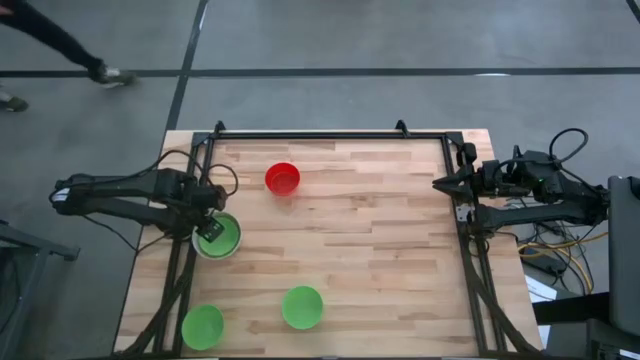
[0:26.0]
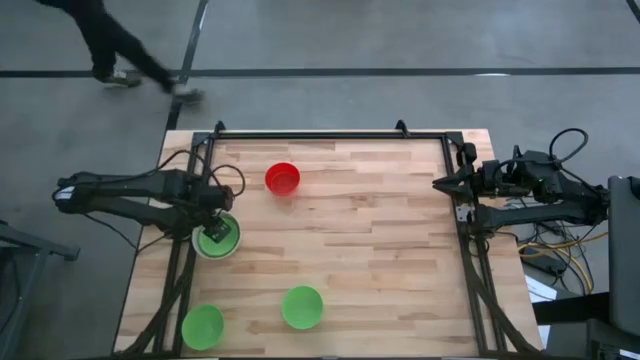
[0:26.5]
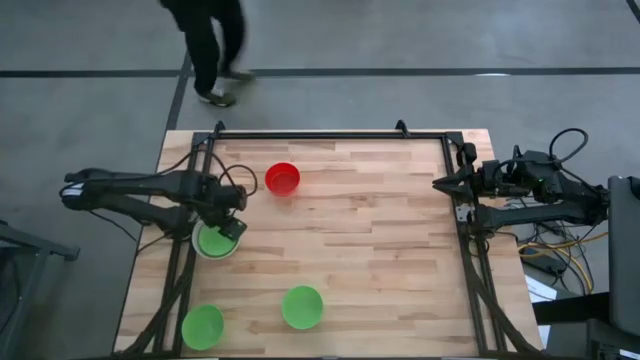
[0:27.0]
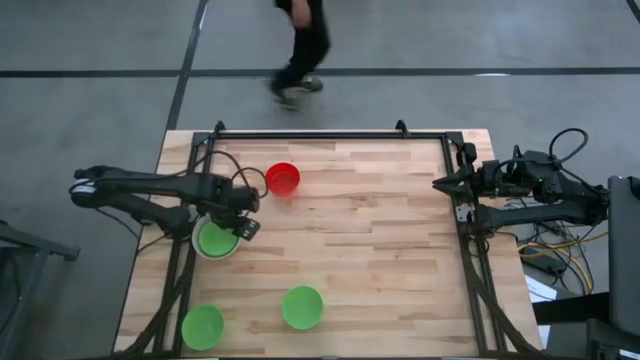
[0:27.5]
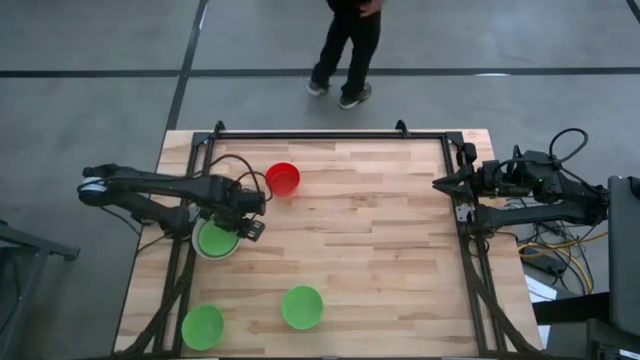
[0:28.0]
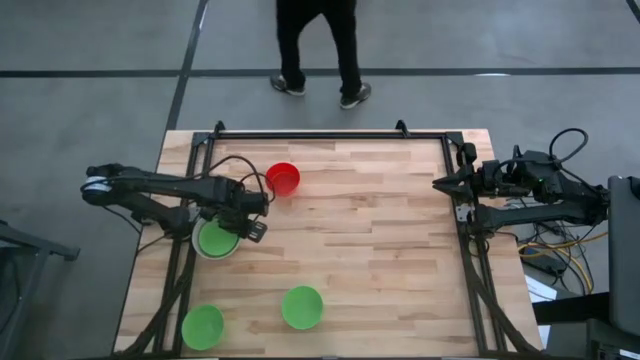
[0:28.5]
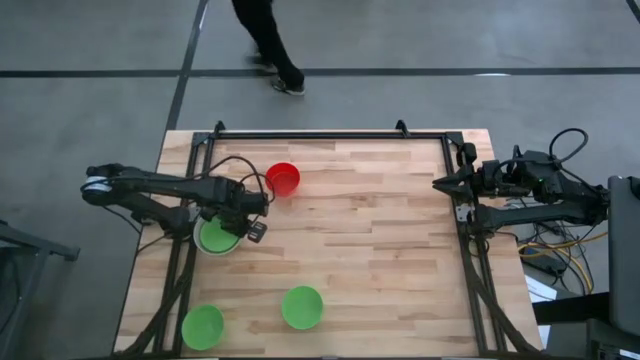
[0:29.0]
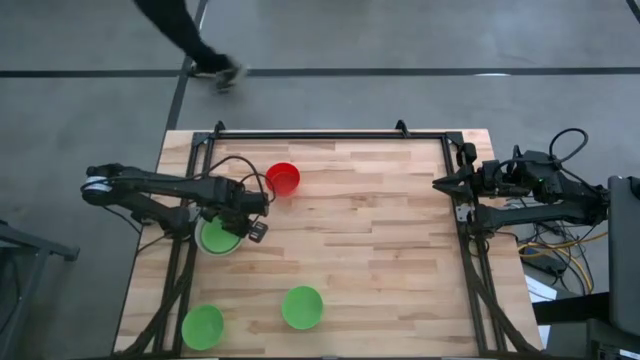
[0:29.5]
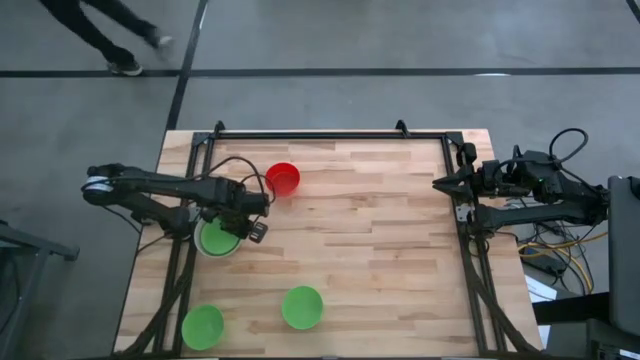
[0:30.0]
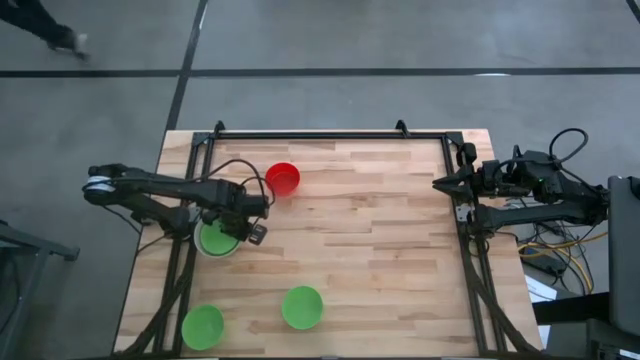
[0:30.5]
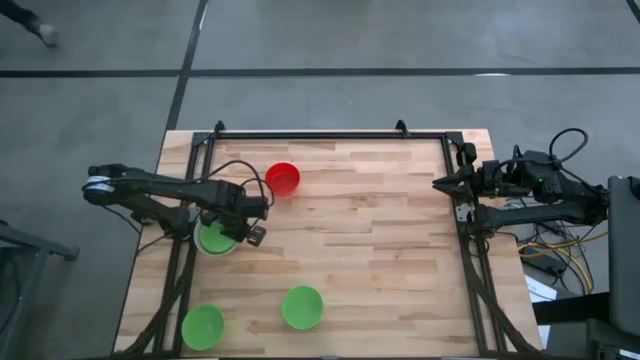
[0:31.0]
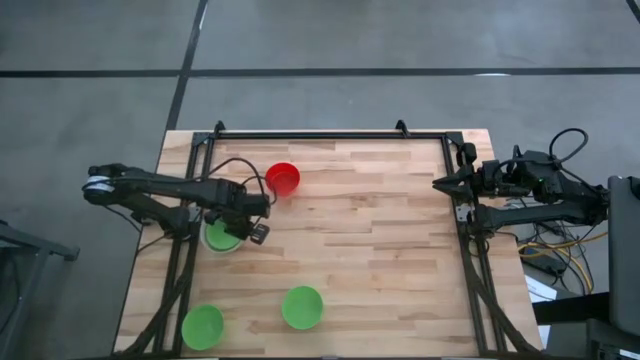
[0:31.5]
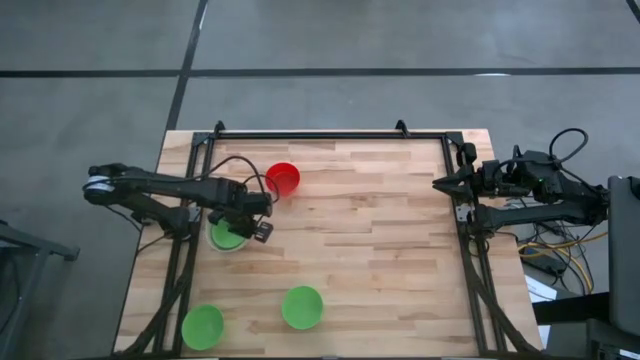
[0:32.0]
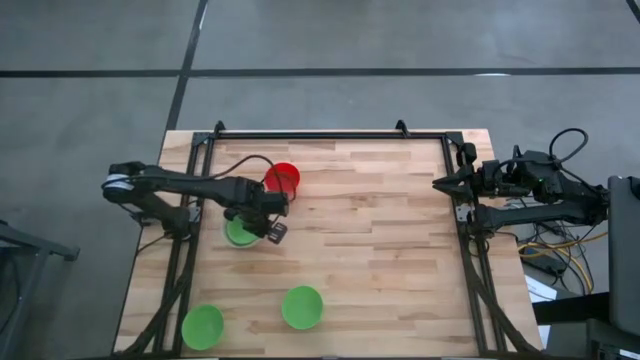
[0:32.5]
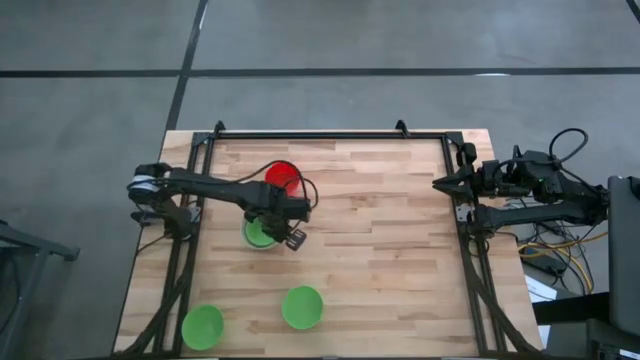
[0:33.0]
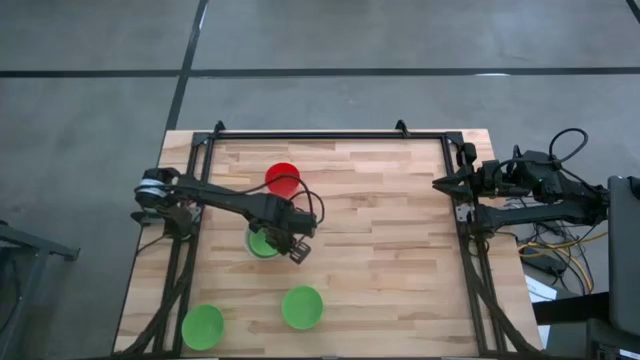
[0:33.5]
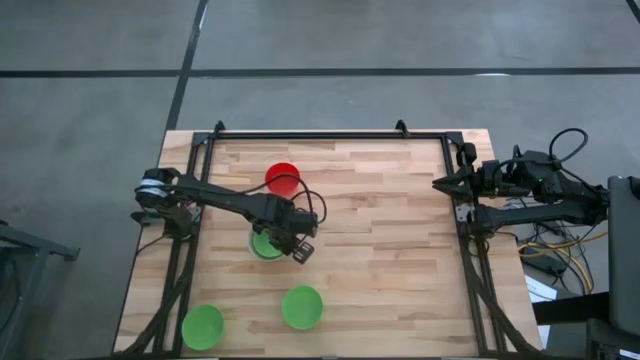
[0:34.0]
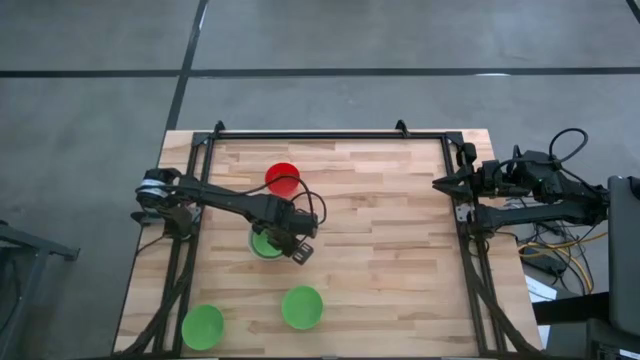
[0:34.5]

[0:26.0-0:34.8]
Move the stacked bowls toward the center of the table

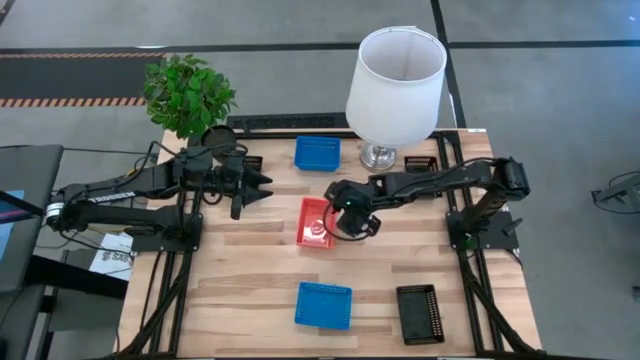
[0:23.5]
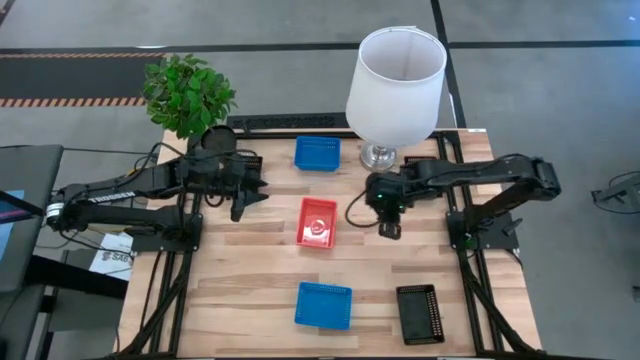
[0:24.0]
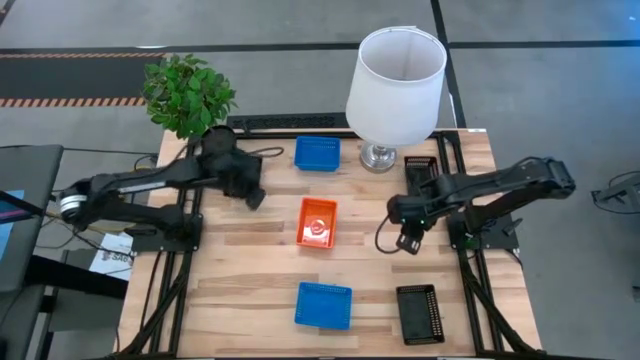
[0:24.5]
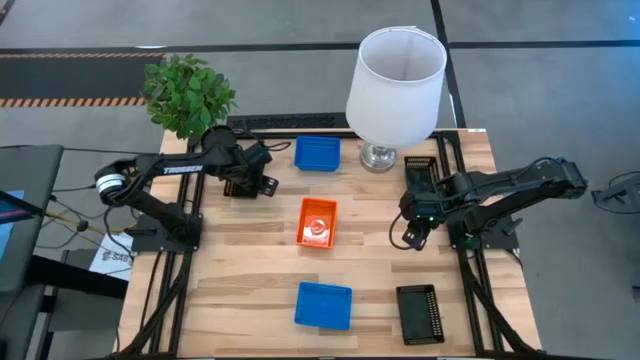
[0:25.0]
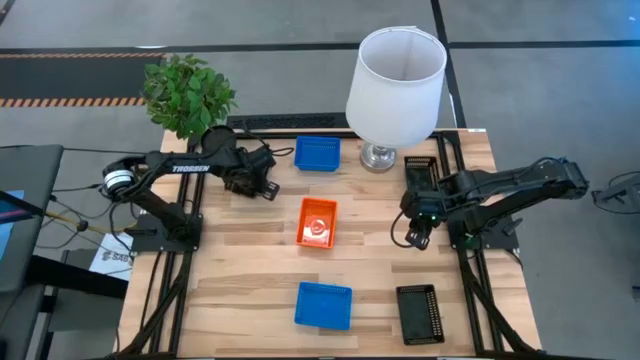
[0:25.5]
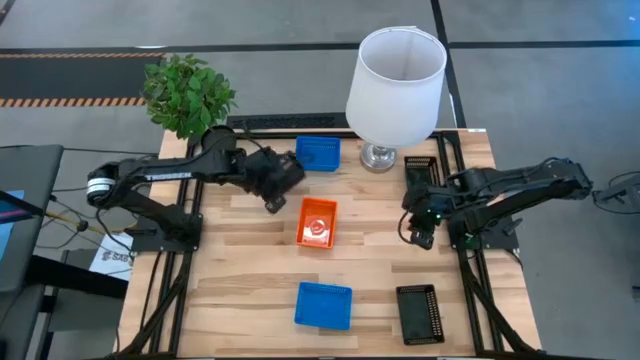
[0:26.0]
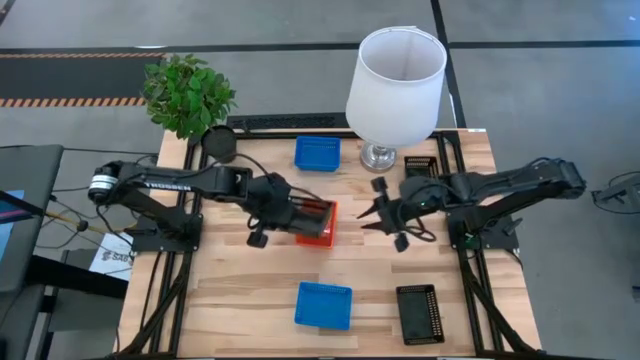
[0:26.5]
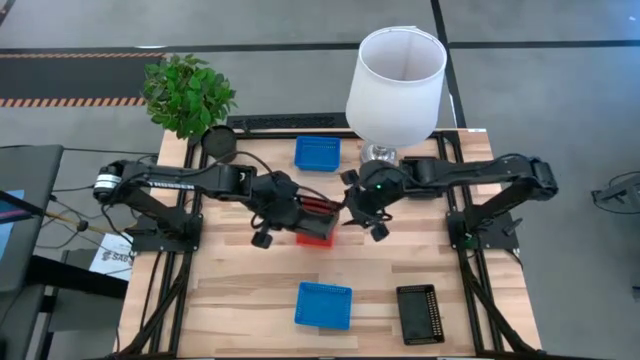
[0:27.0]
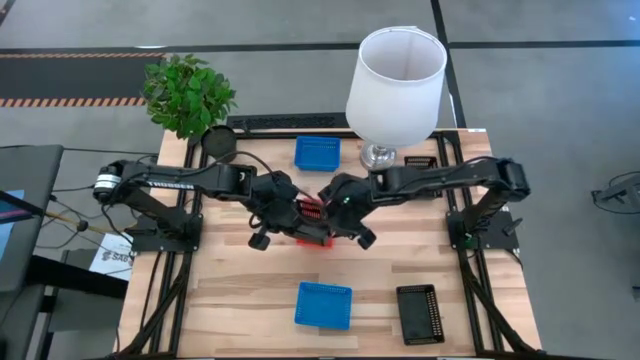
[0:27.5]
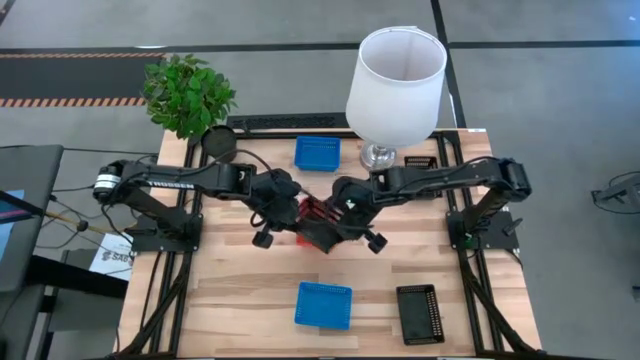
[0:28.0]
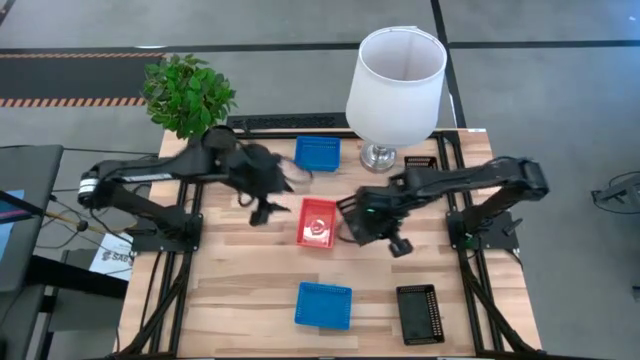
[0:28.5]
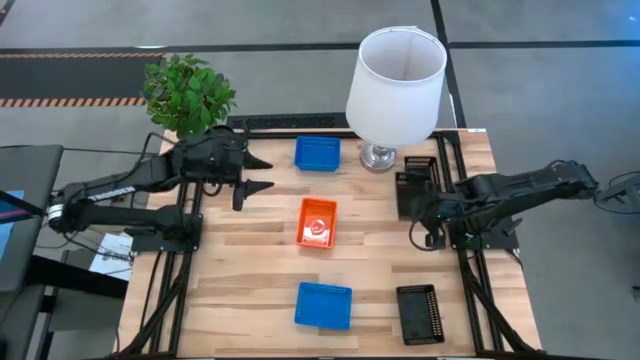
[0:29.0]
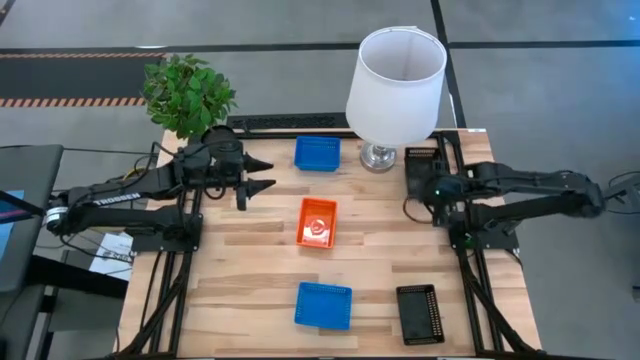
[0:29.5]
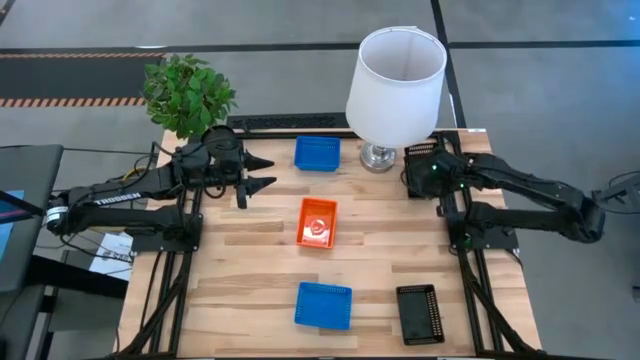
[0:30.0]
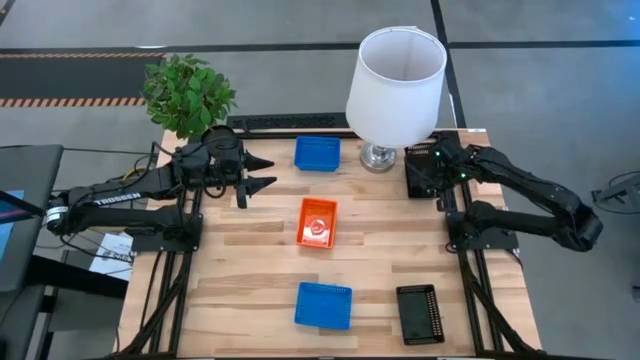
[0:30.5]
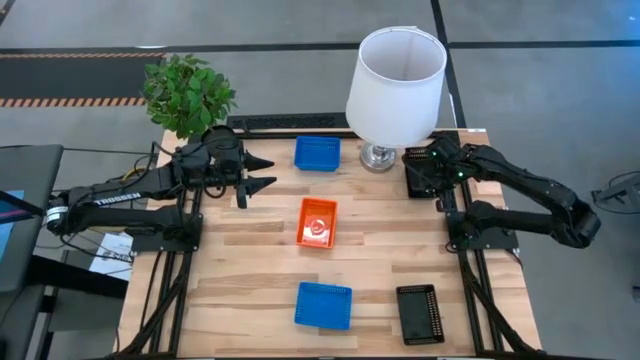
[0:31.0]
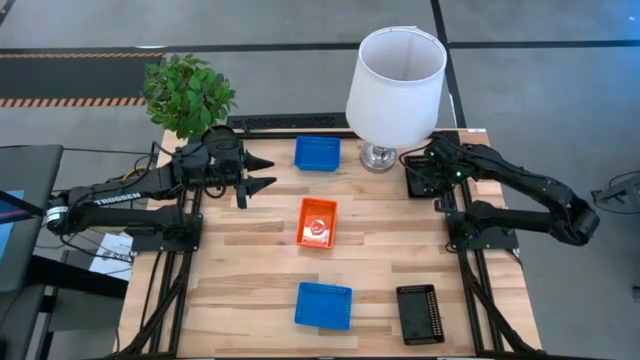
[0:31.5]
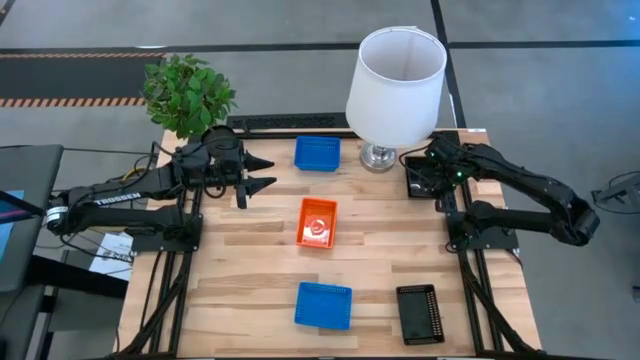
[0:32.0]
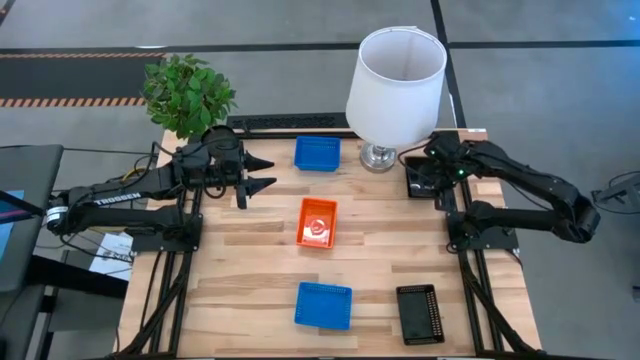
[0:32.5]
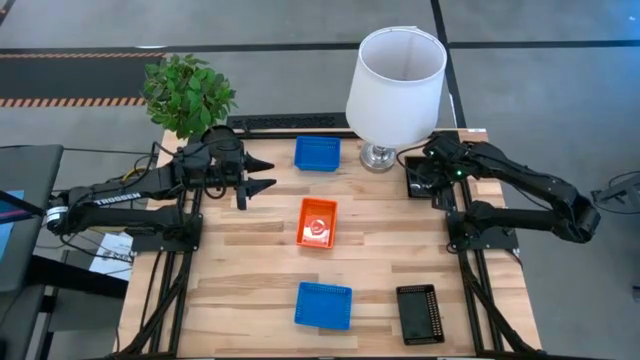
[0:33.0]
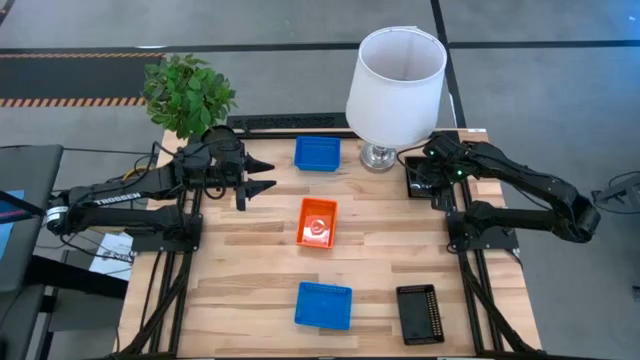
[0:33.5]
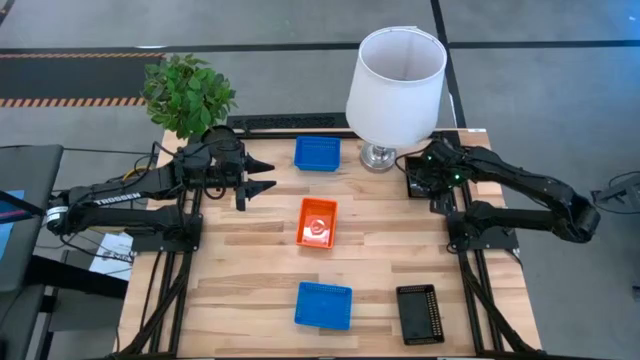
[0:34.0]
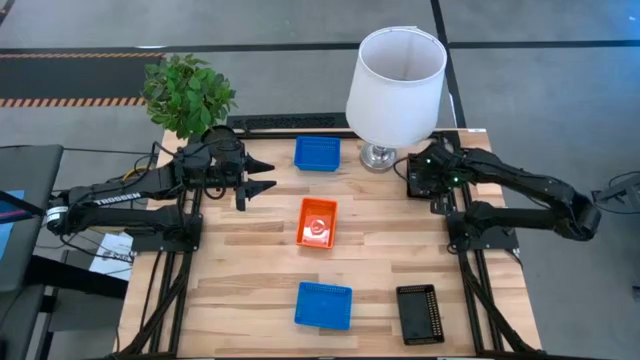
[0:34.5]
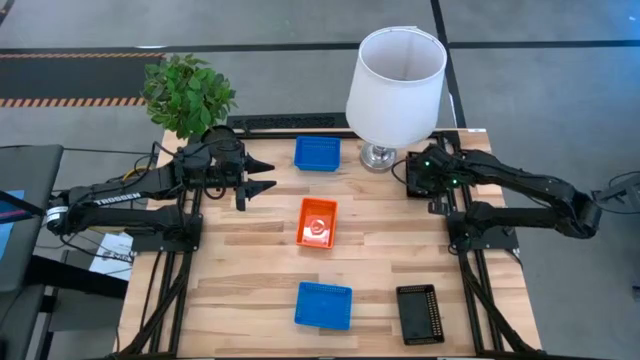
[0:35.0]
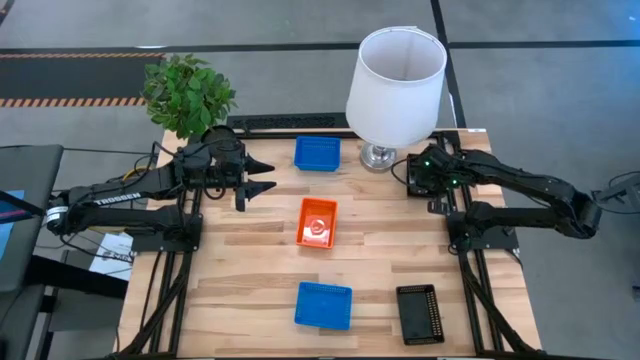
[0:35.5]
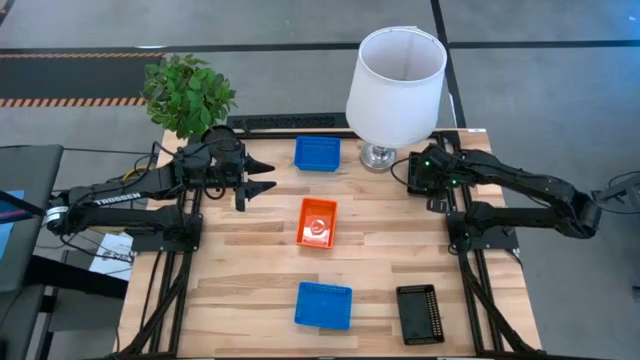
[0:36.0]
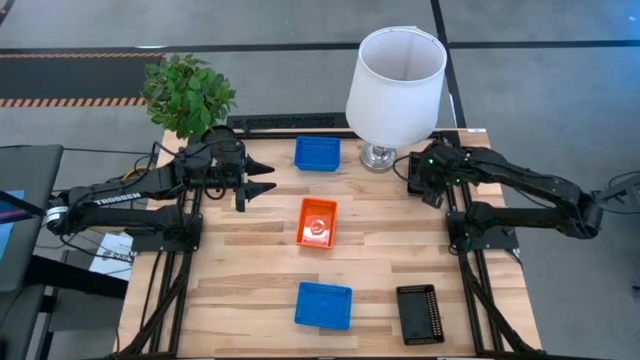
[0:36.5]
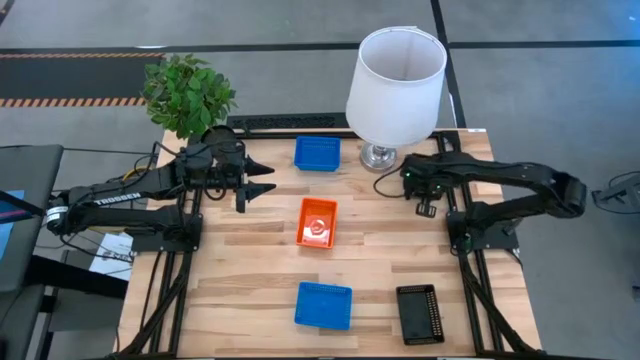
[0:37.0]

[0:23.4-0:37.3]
Stack the left black bin on top of the top right black bin
